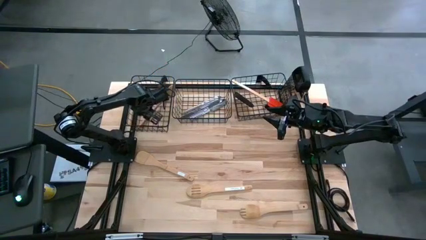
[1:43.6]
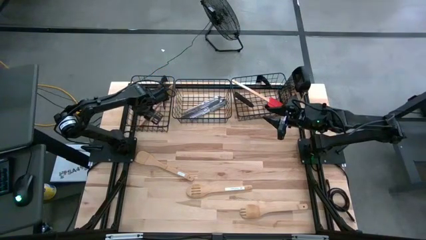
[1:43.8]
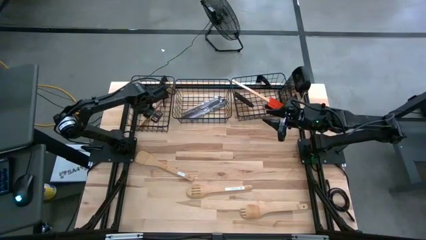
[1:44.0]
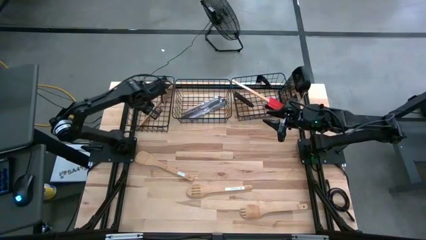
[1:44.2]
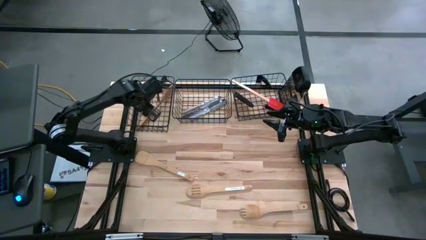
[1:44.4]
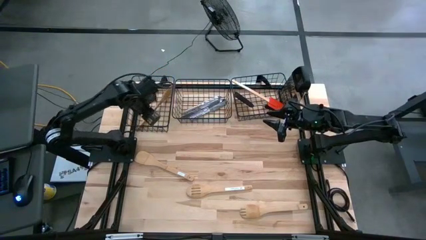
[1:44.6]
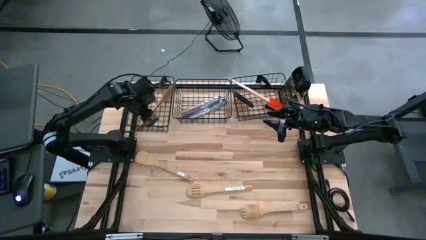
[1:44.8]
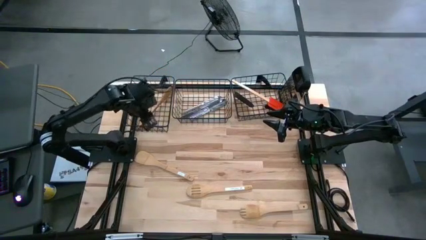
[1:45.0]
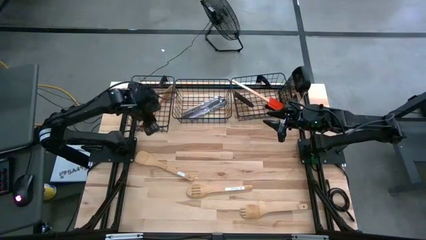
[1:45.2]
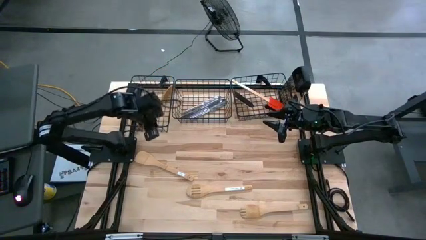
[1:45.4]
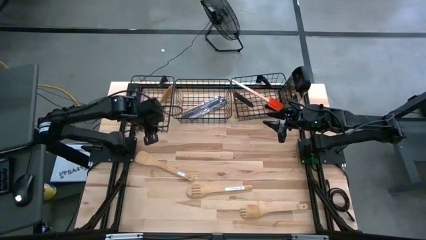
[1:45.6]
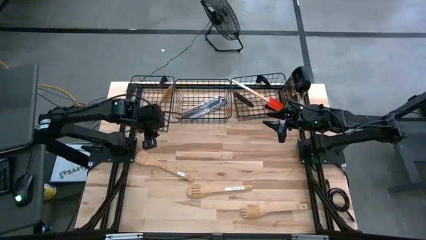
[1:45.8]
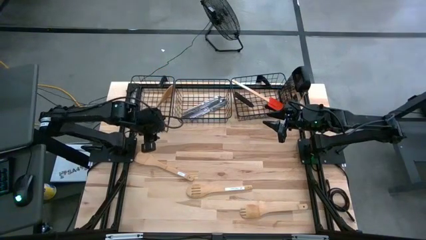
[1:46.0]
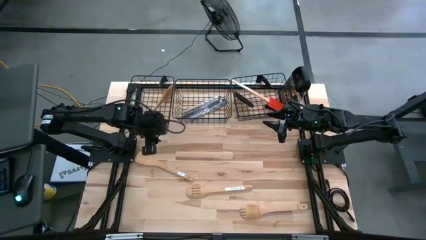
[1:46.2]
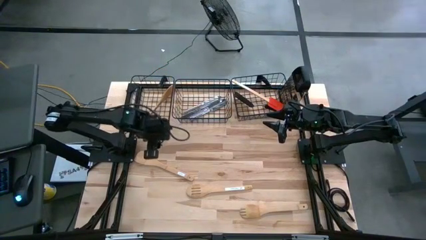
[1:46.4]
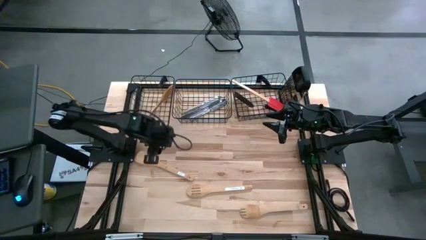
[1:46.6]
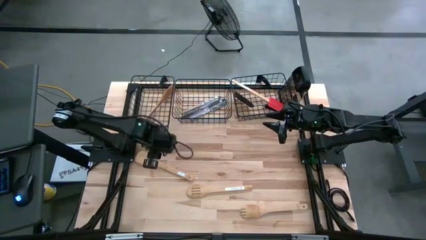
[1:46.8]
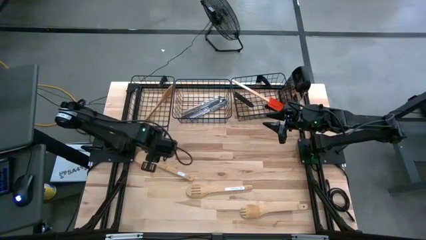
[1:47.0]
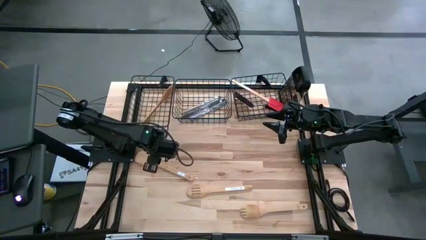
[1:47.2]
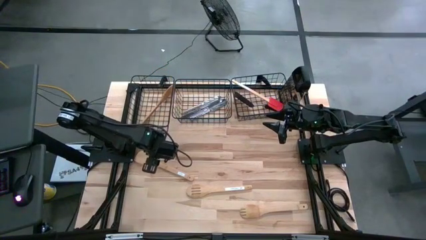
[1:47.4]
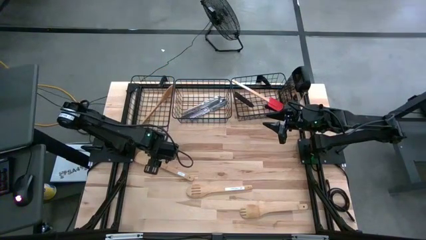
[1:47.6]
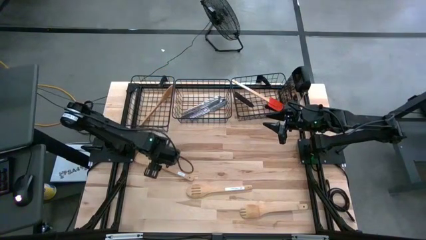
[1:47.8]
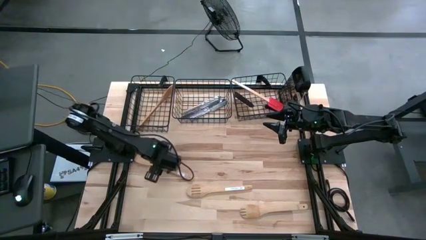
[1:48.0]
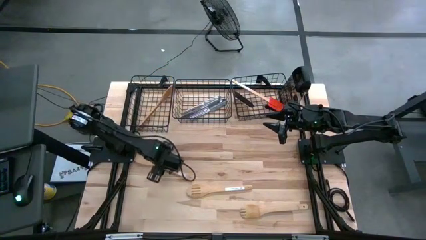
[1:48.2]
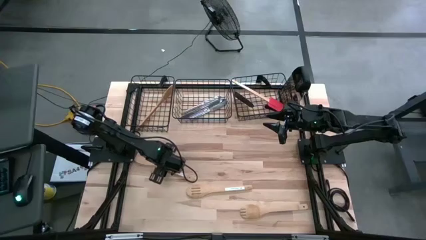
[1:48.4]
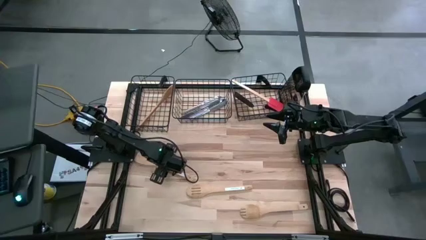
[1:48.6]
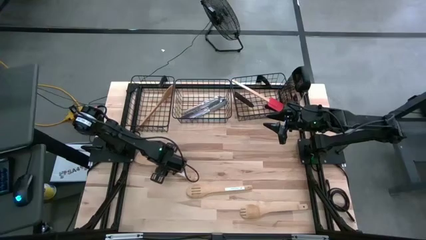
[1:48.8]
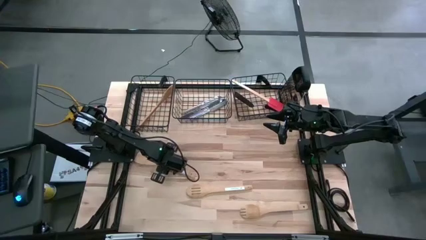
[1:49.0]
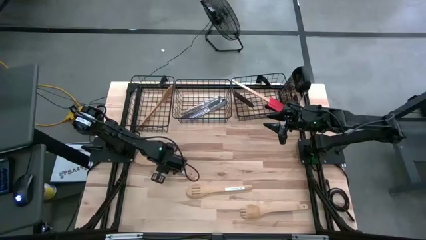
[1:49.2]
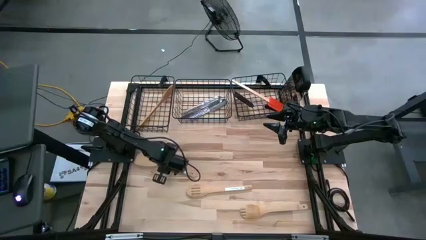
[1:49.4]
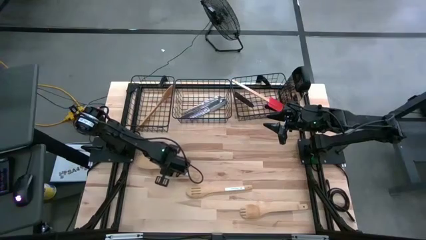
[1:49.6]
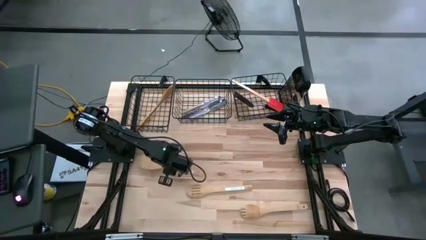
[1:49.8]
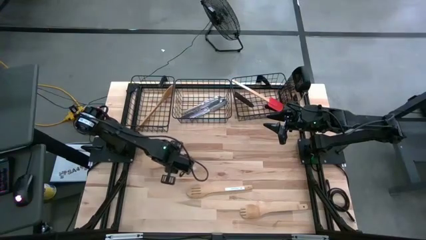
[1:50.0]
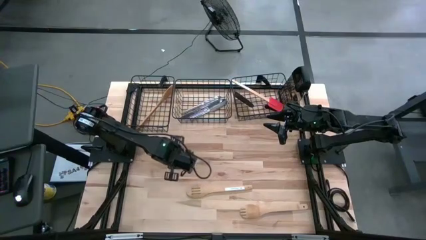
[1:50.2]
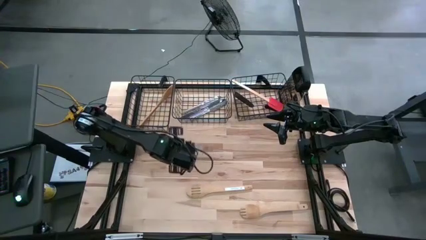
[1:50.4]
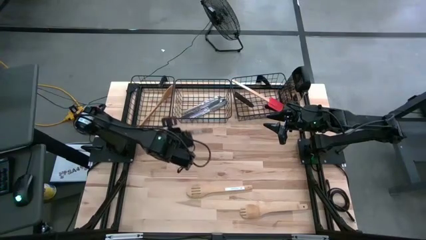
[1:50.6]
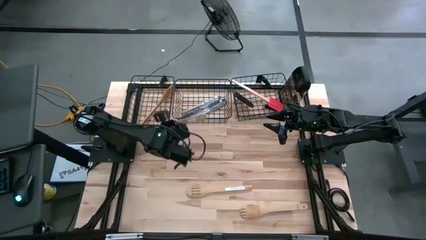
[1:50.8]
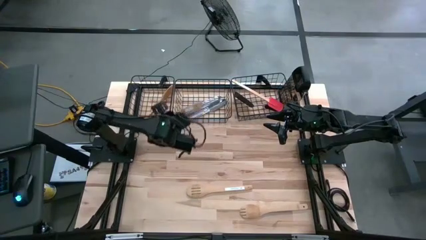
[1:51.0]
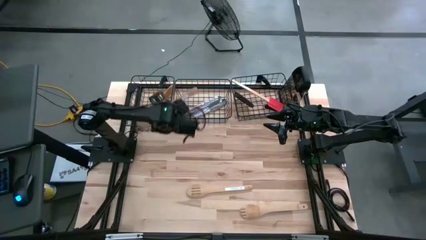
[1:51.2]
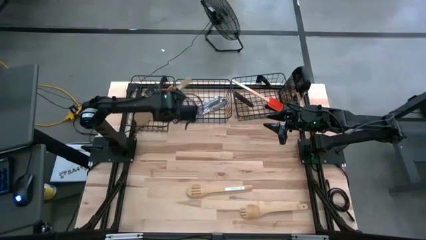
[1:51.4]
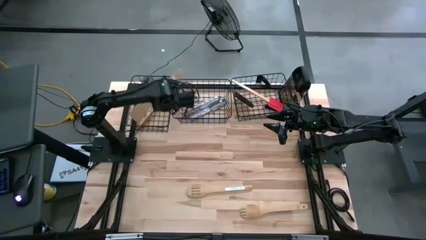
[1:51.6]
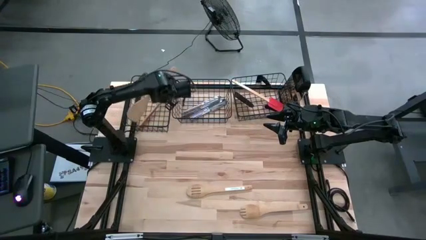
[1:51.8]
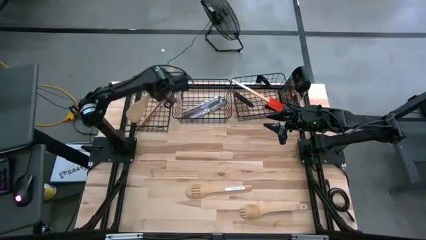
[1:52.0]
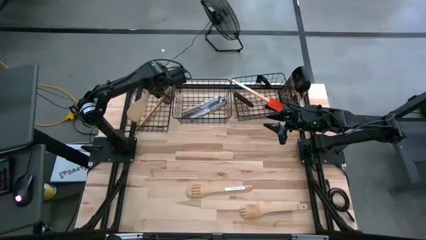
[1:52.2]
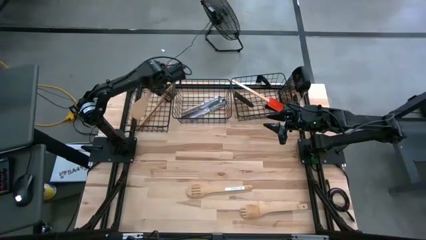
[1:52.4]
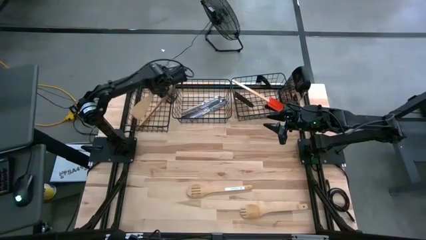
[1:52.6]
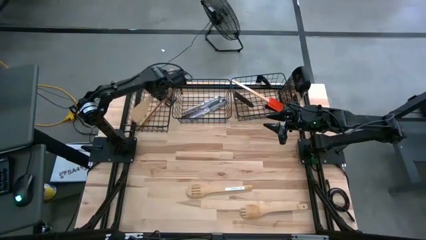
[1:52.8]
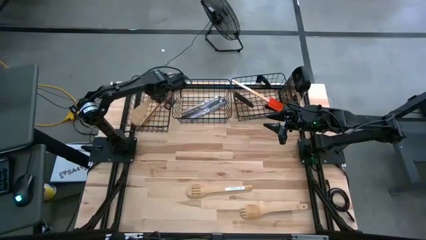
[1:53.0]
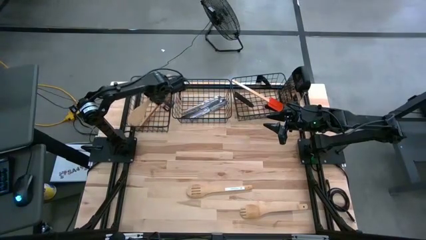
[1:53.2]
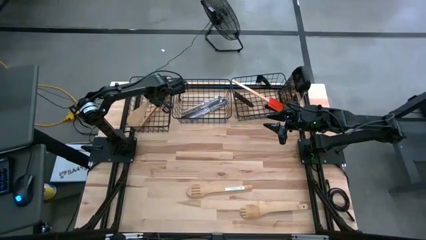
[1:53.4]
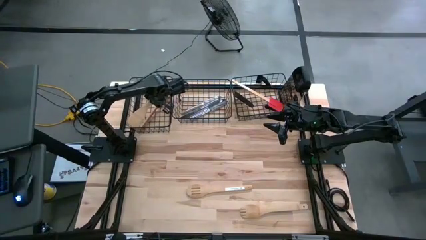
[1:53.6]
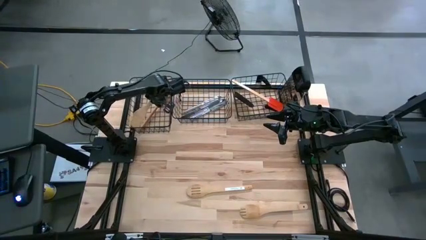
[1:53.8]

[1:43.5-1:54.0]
Task: Pick & Place Kitchen Items
Put the wooden spatula into the left wire basket

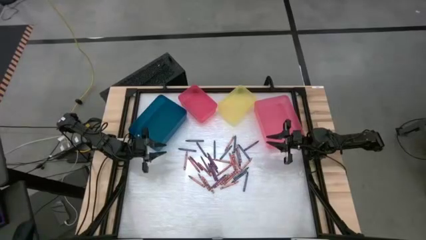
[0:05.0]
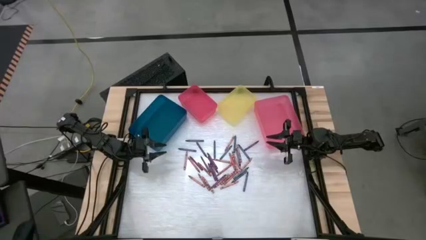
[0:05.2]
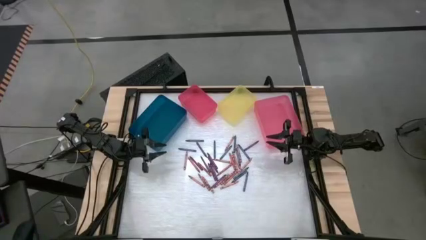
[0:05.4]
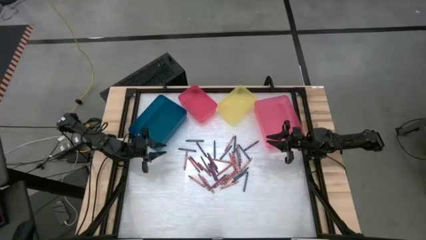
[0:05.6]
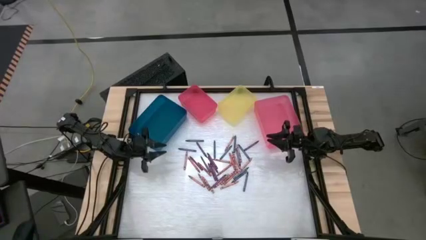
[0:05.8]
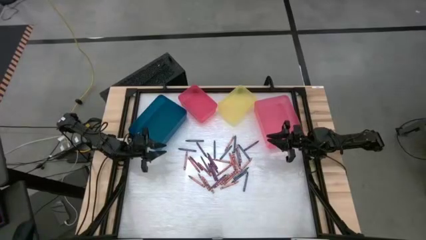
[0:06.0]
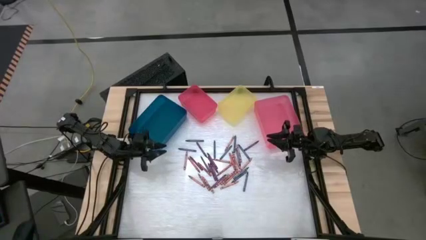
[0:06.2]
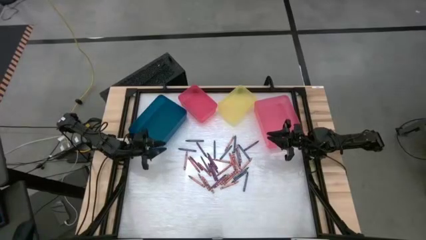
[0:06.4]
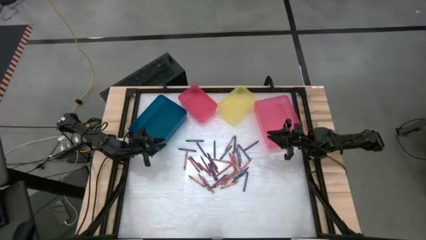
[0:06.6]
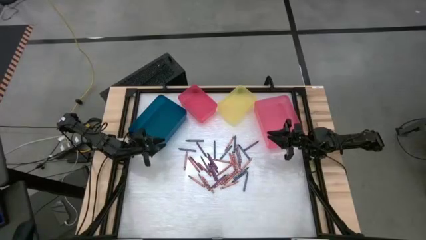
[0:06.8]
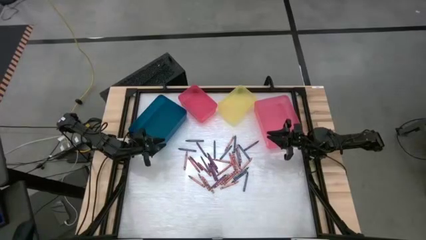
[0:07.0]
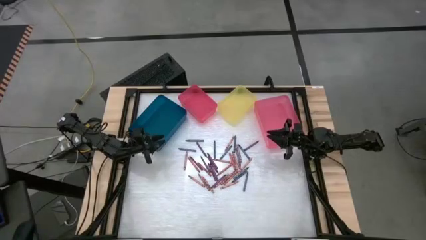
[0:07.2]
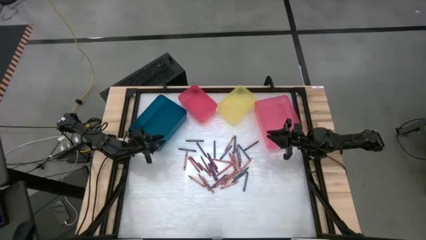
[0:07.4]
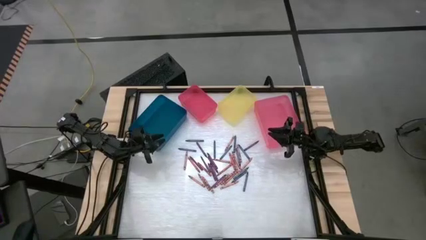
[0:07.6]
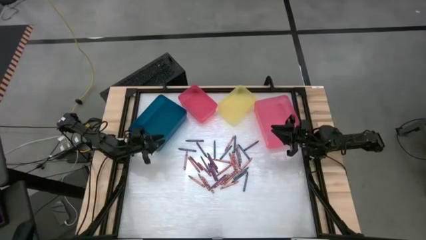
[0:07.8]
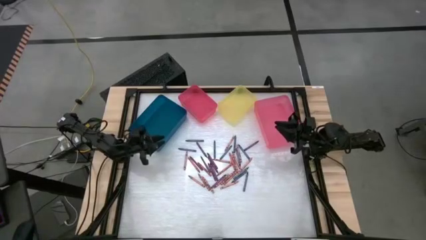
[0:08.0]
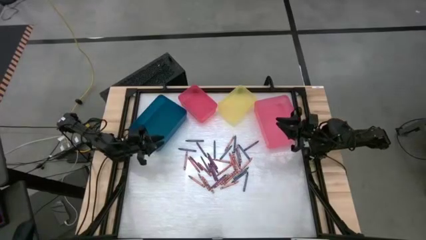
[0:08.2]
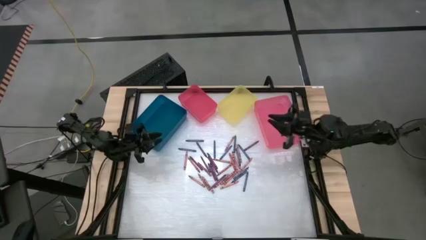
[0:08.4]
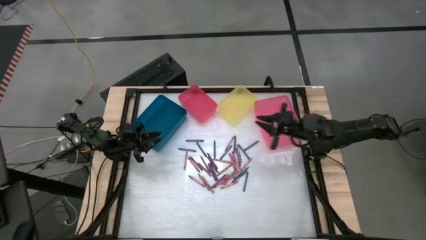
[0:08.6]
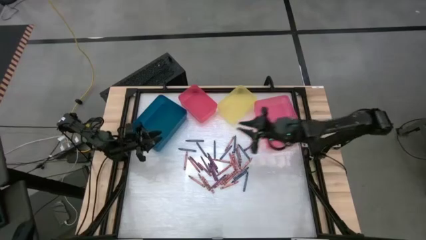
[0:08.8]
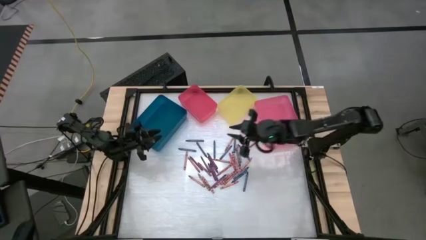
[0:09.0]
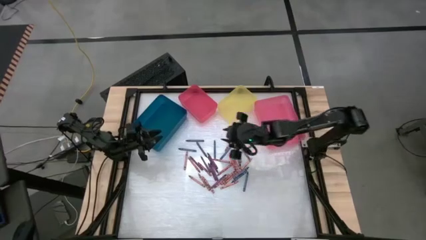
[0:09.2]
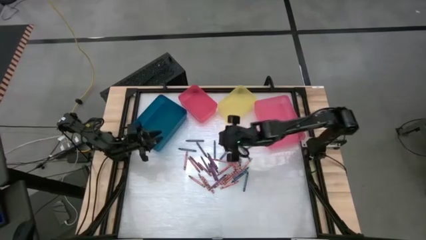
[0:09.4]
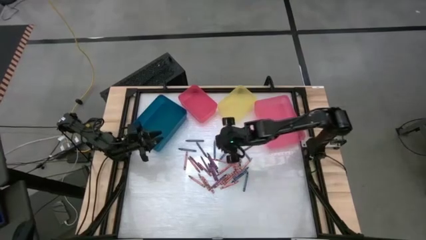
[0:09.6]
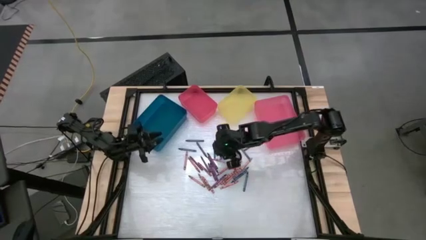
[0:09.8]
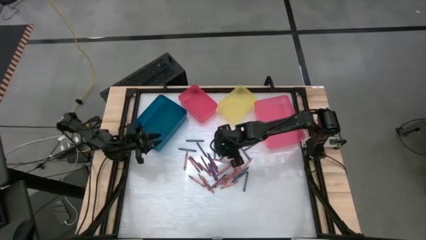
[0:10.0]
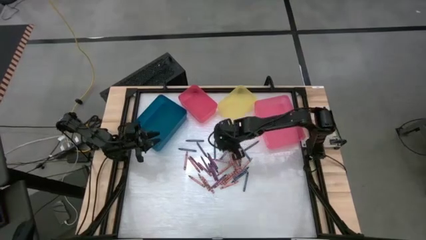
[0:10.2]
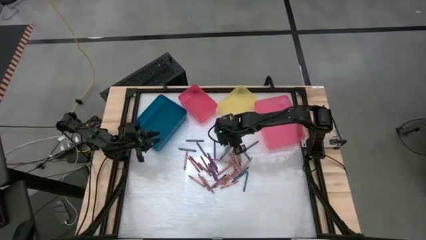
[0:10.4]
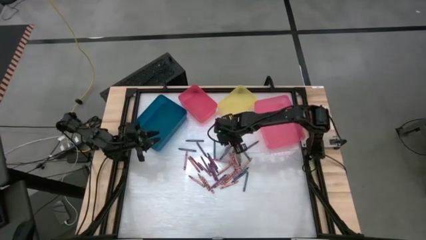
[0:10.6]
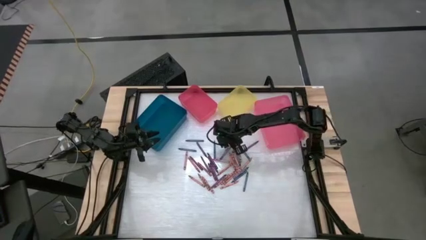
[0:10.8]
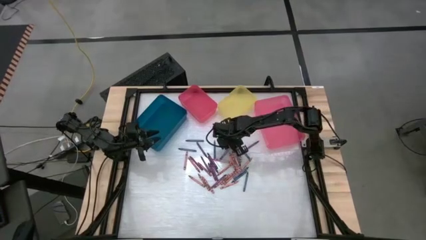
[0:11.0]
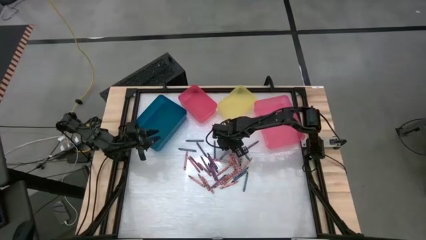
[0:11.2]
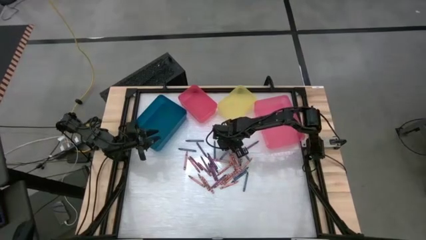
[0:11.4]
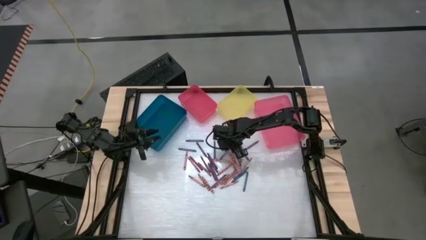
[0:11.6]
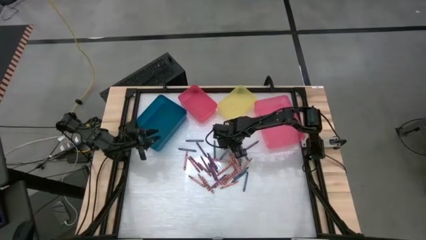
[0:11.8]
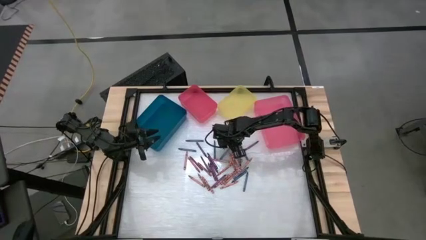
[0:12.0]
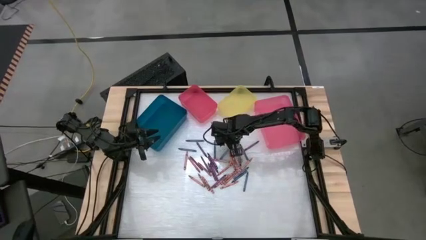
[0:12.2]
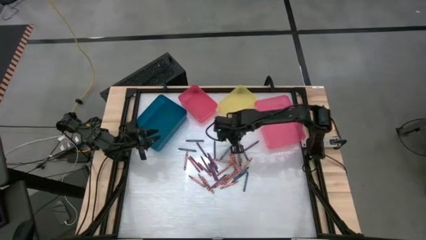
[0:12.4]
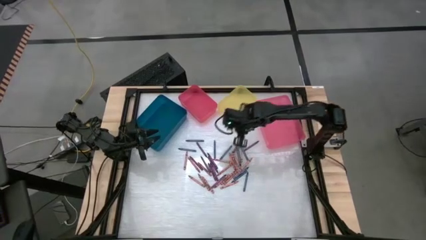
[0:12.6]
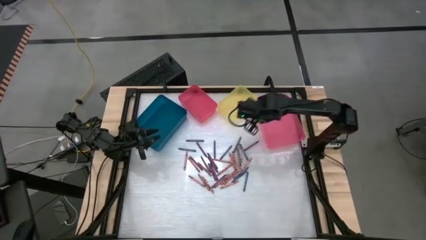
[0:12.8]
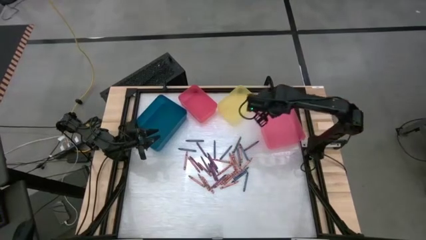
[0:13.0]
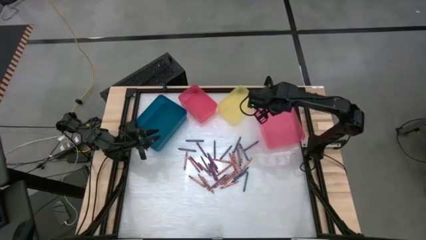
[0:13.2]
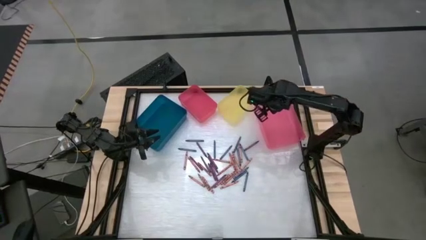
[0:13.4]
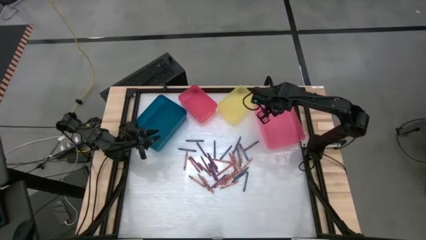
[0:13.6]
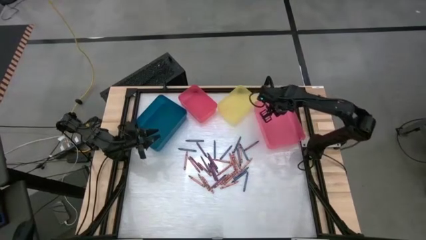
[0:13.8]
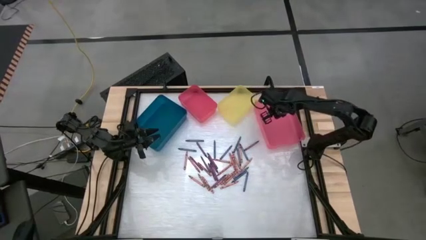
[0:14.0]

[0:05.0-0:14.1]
Task: Sort crayons
Put the pink crayon into the right pink bin
